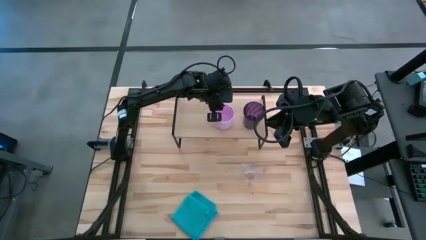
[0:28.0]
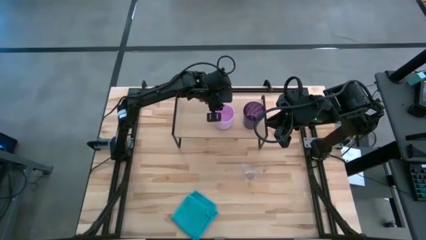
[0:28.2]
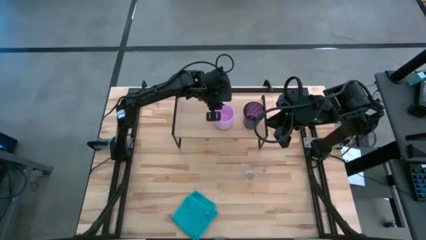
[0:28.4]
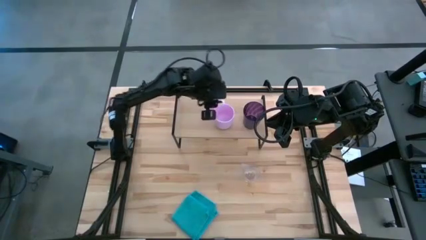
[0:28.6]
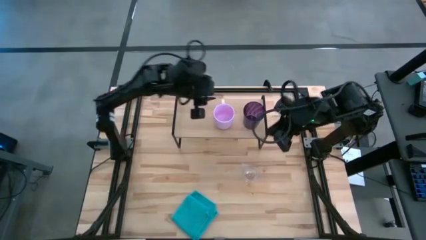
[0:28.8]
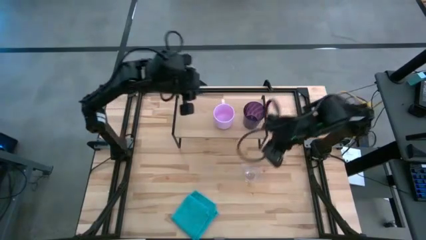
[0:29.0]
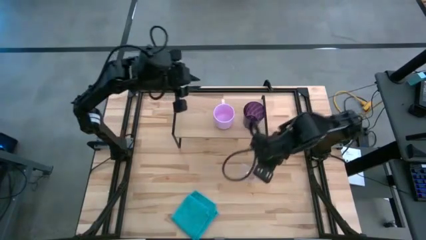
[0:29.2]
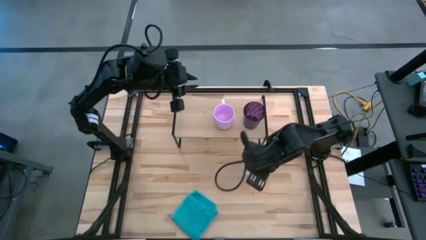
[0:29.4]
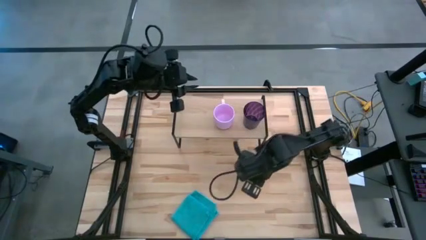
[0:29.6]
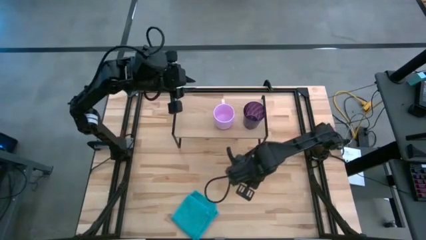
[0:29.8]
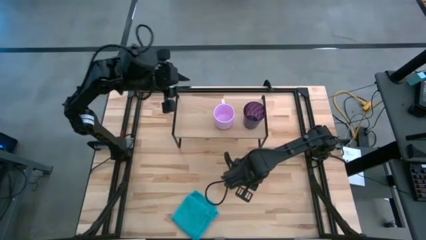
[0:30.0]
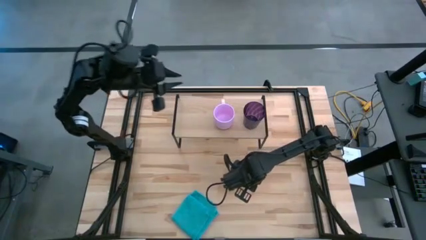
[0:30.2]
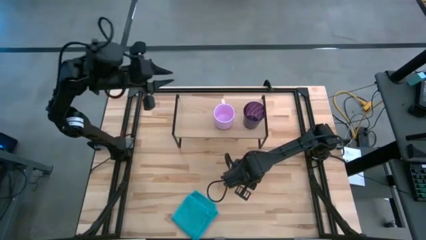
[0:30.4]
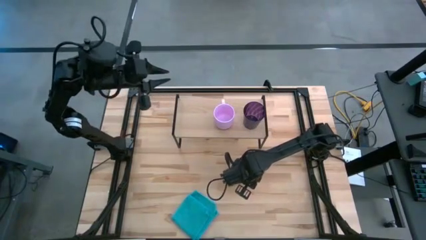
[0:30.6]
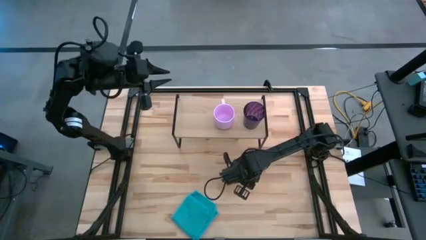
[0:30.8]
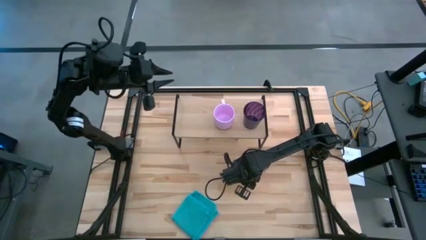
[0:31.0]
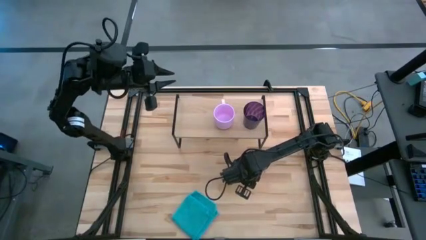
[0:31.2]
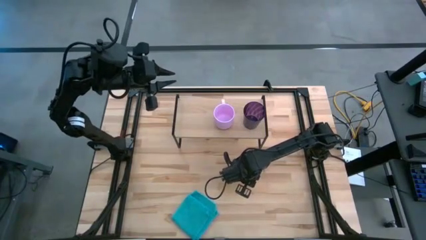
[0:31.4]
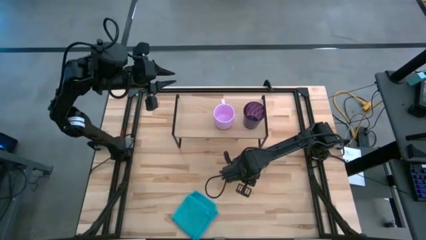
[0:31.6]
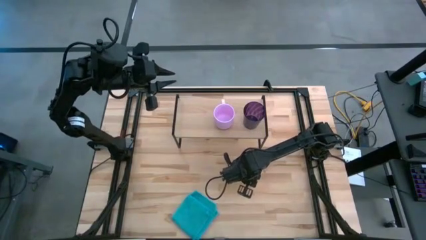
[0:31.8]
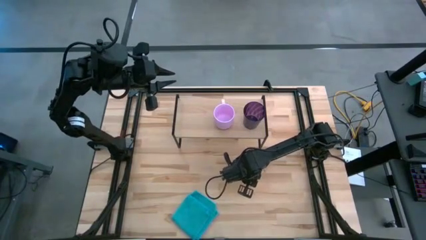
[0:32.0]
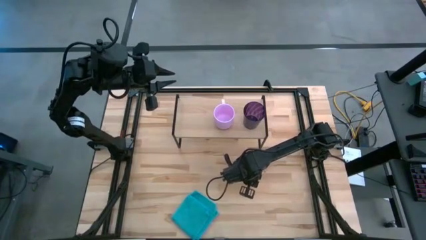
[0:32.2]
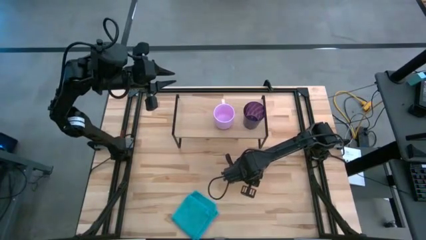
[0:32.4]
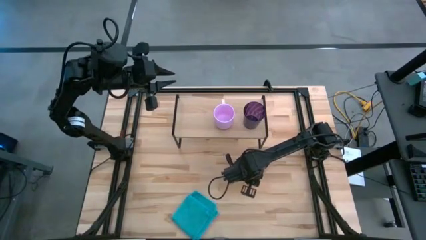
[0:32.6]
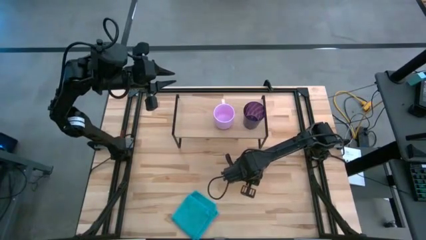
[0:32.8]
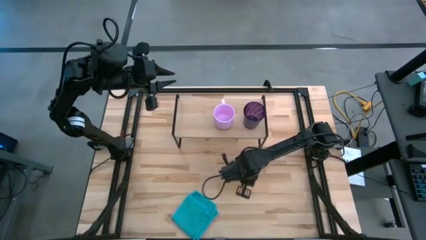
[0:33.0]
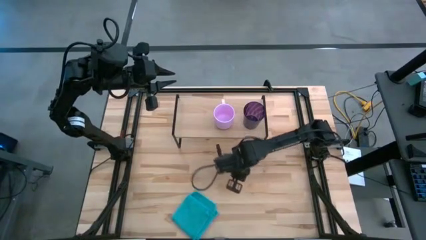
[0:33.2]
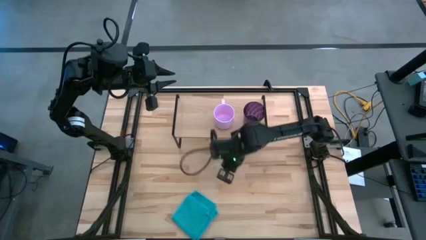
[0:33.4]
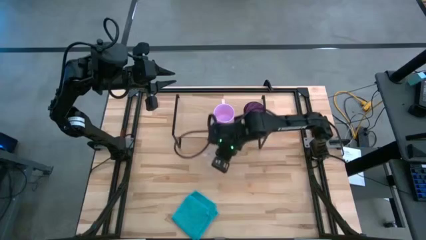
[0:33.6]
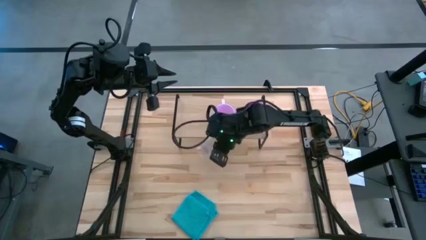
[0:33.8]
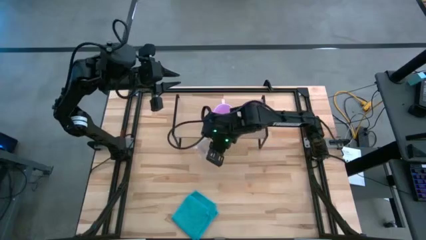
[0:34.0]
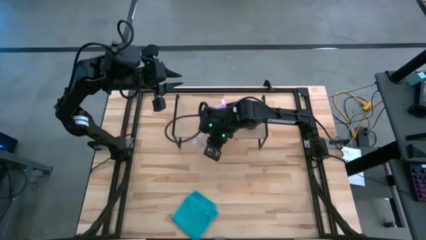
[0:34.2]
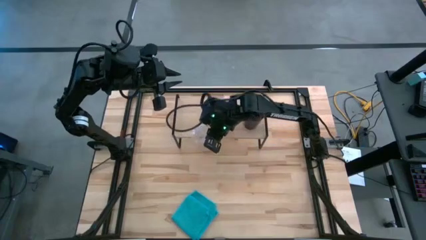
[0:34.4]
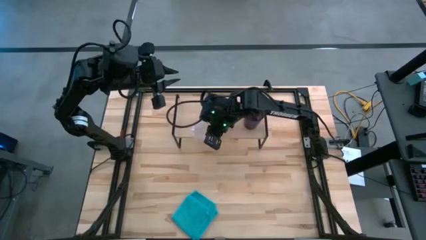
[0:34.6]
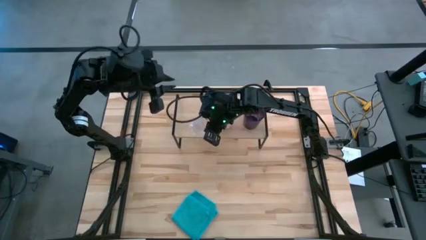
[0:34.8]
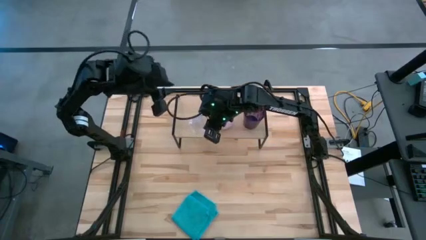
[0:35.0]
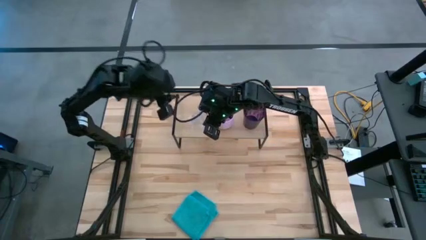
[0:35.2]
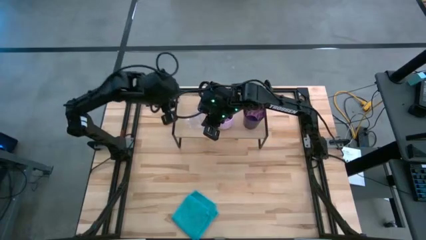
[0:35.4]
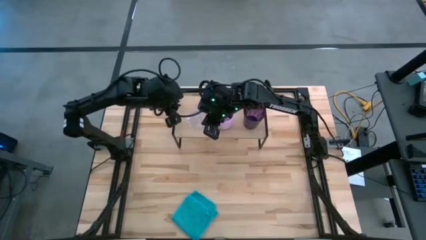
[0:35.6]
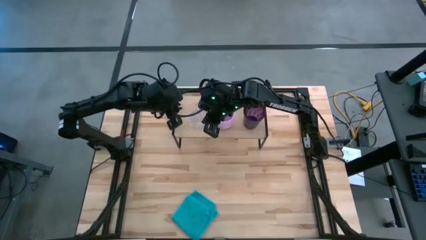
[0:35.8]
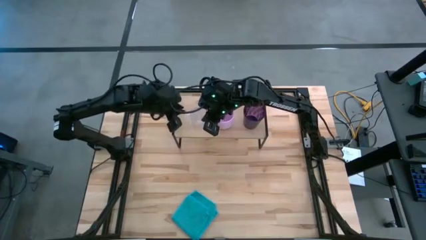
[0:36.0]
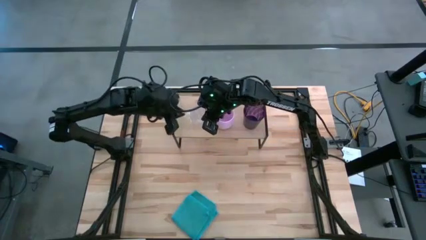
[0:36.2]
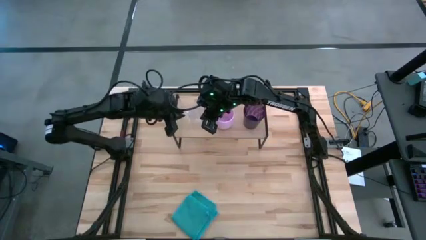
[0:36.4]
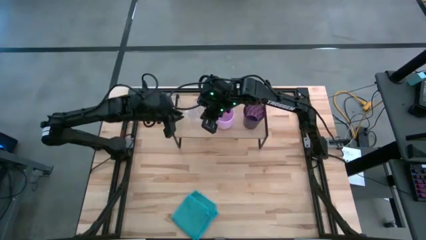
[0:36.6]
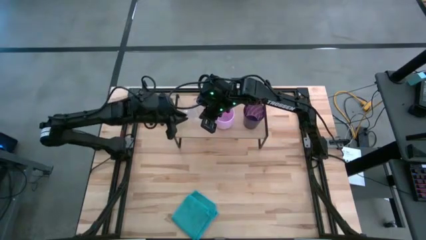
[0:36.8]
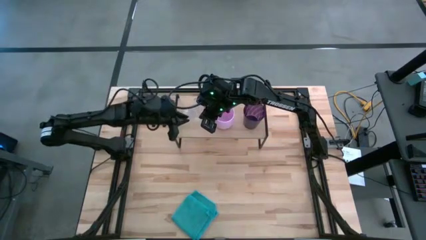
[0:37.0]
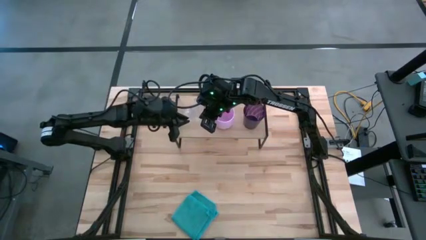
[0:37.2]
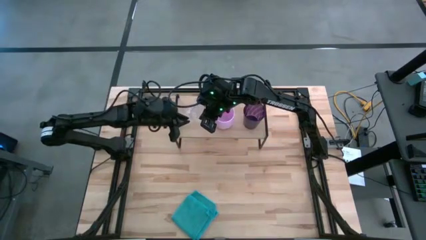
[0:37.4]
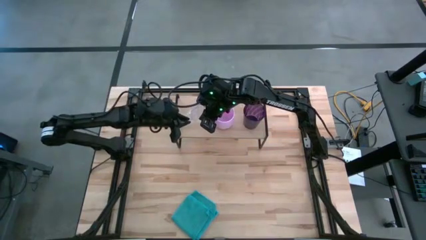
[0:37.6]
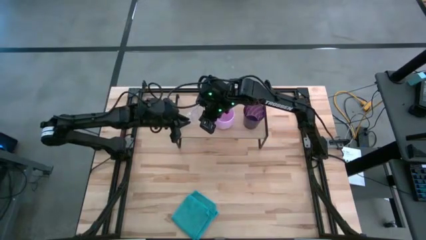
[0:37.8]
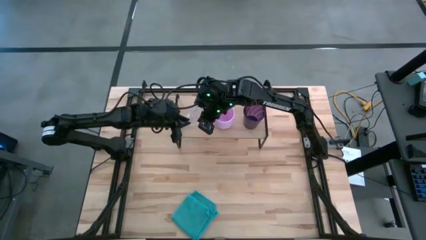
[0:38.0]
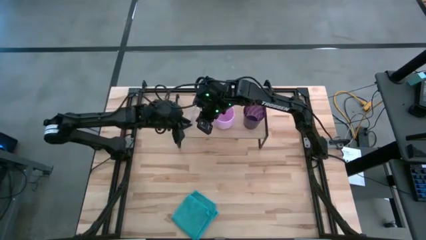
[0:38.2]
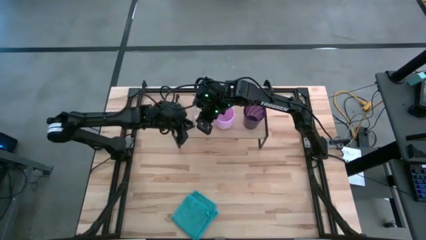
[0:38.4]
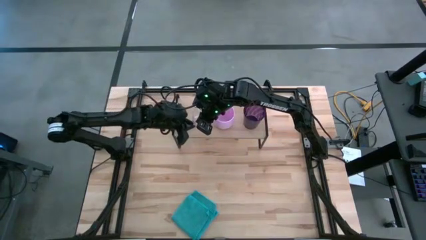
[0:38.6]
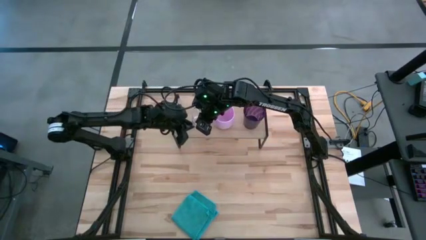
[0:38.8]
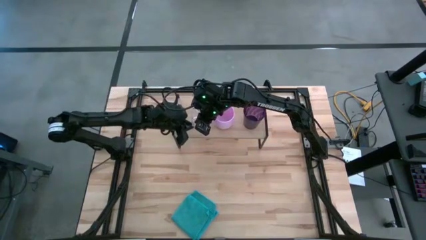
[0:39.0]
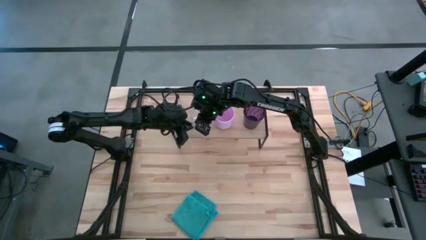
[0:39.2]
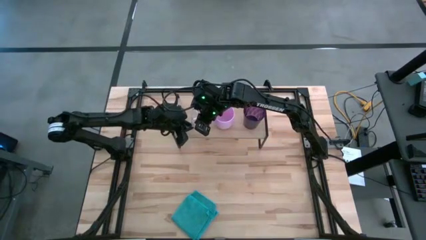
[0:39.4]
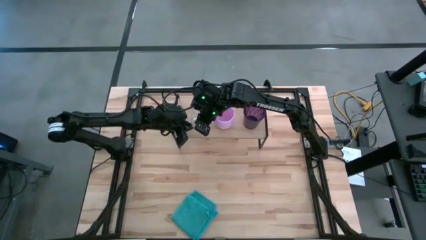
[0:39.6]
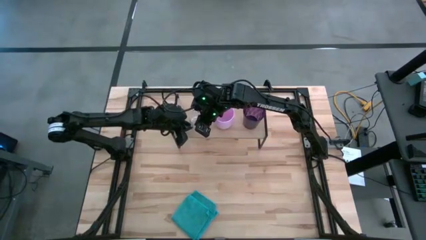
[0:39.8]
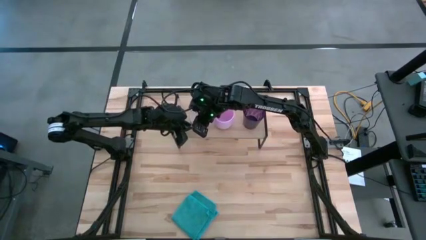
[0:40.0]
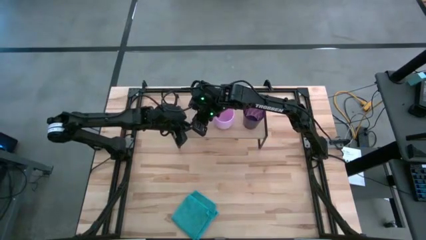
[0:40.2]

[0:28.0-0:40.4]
Task: Stack small to large cups/mugs on shelf
Put the transparent mug on the shelf
